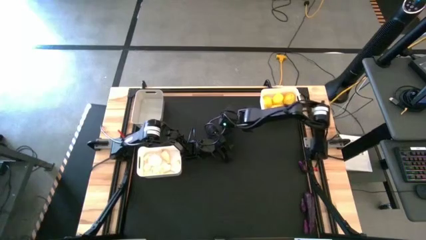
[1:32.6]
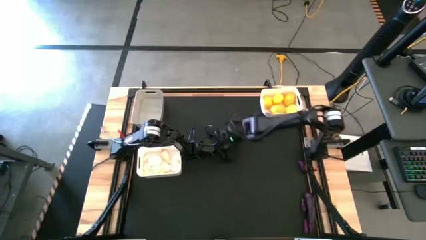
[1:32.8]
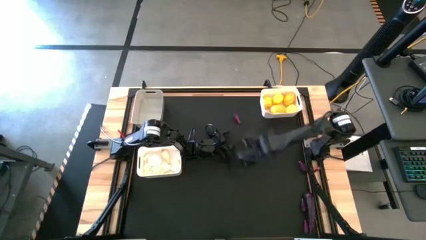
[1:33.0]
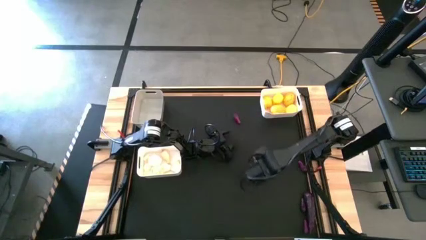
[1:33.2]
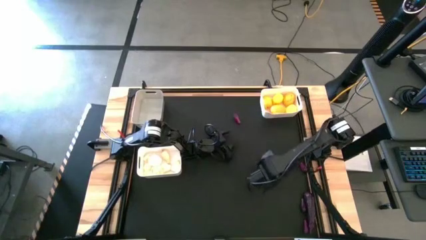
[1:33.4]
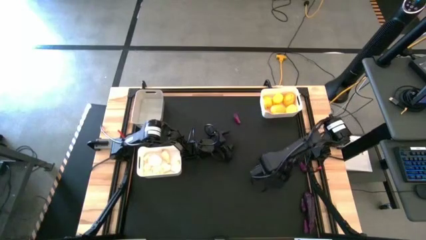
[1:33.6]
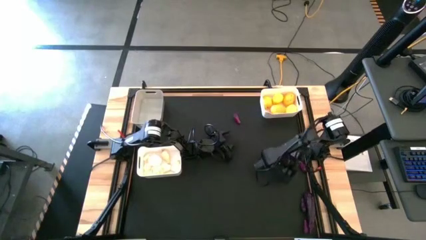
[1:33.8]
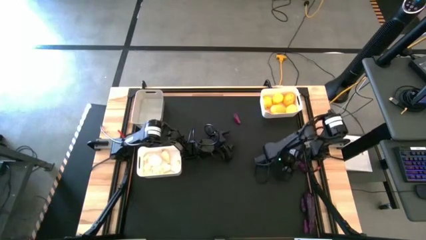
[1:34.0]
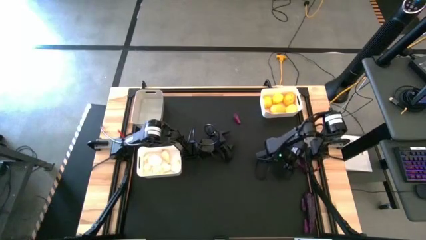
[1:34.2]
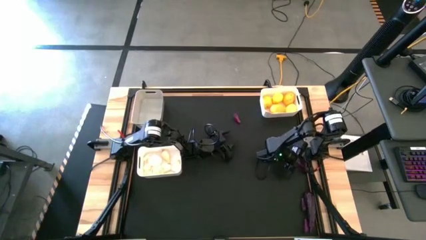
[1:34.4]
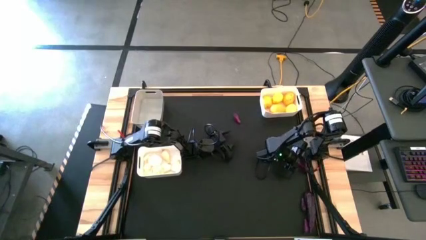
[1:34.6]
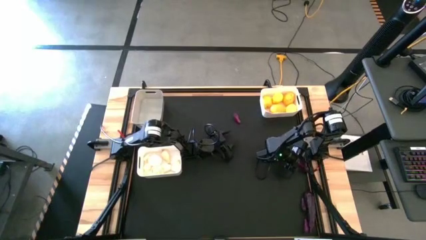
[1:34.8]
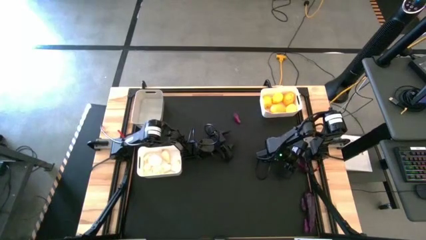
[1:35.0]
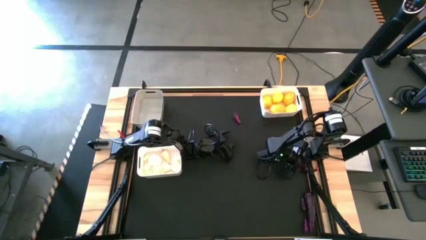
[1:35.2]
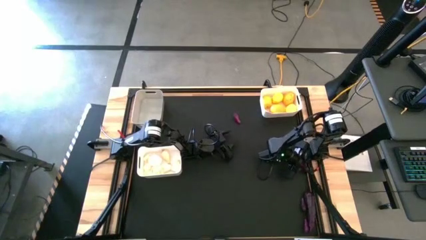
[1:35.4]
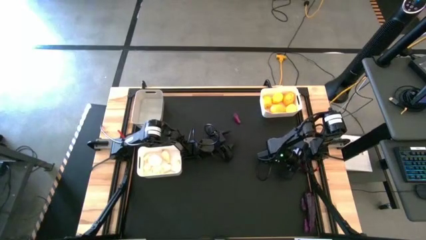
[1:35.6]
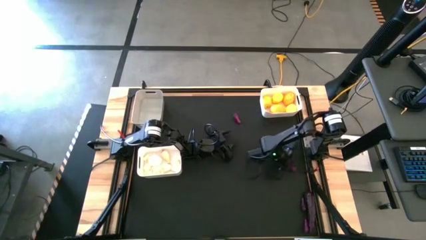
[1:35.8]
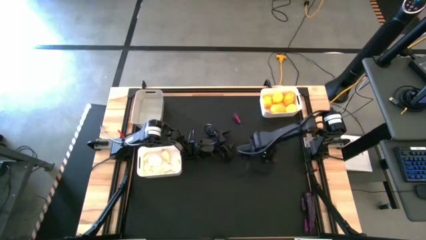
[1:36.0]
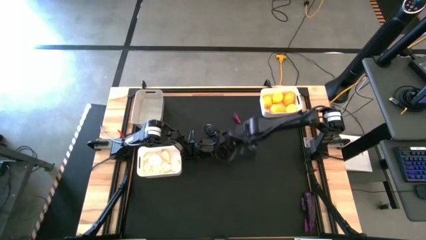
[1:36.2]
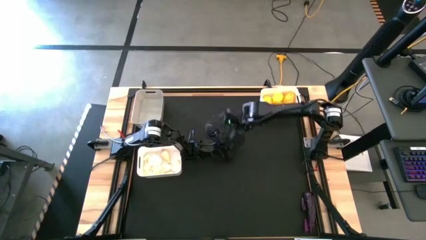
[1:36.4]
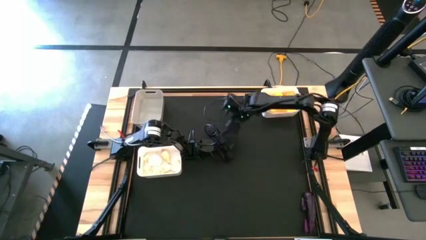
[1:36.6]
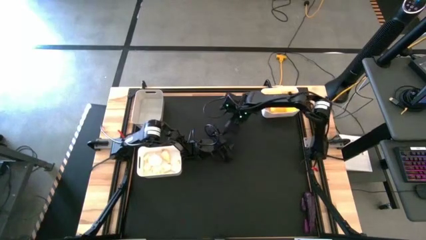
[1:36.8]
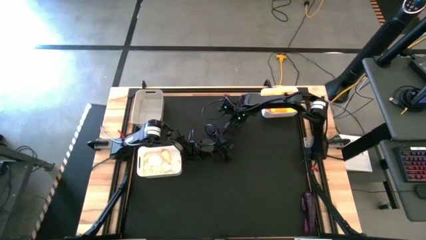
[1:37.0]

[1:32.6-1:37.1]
Task: Sort produce into baskets
Move the violet eggplant to the top center of the table

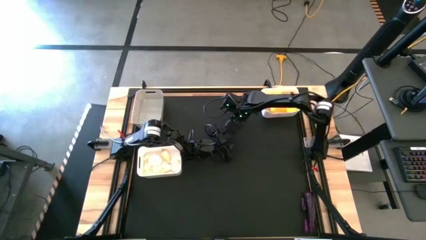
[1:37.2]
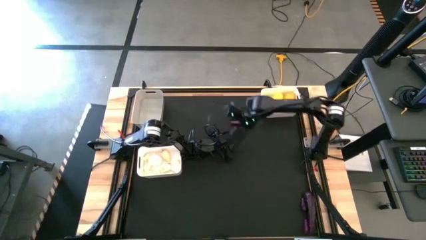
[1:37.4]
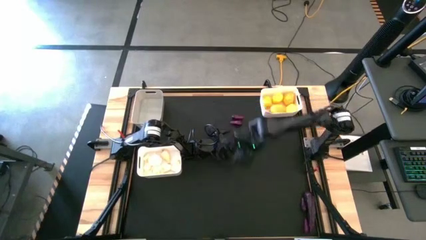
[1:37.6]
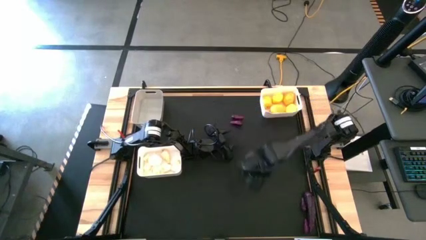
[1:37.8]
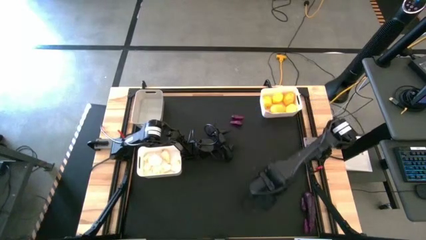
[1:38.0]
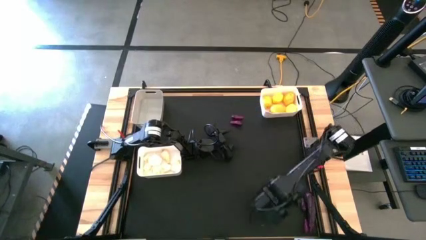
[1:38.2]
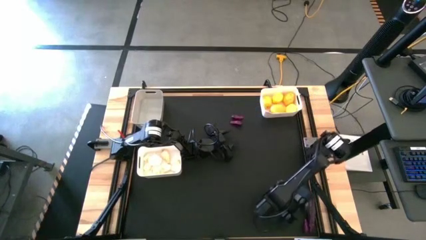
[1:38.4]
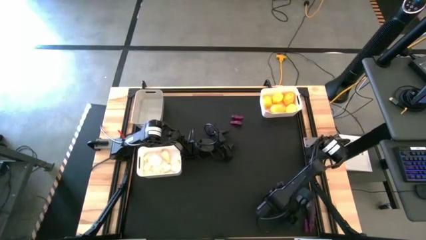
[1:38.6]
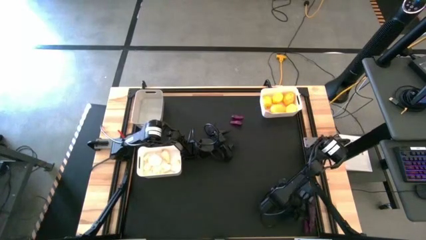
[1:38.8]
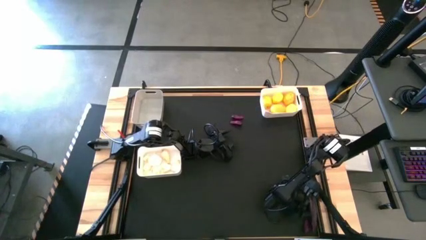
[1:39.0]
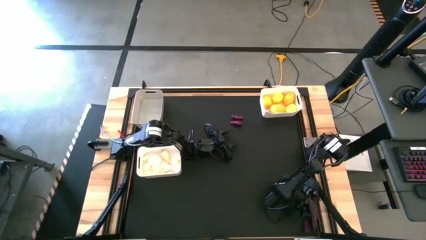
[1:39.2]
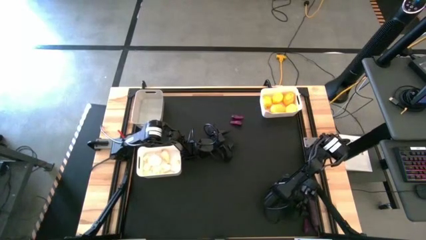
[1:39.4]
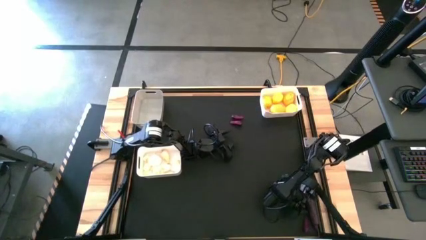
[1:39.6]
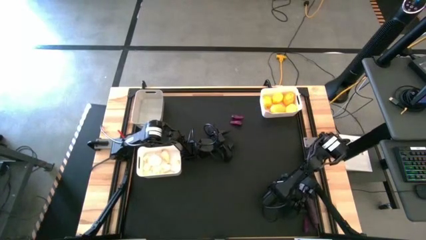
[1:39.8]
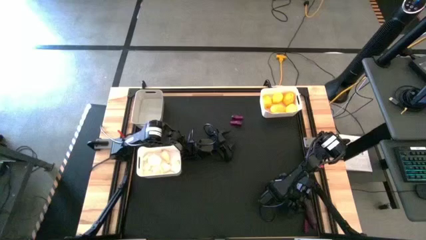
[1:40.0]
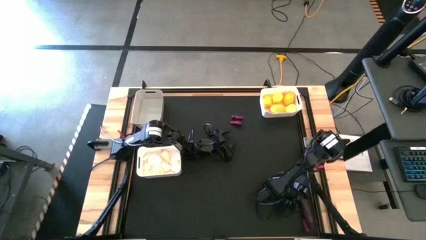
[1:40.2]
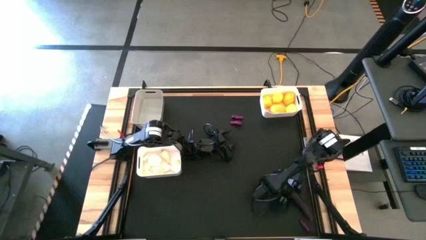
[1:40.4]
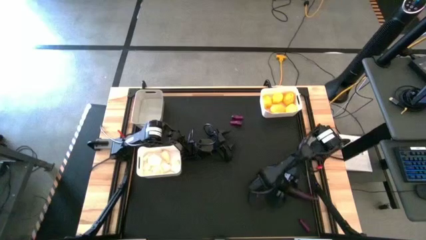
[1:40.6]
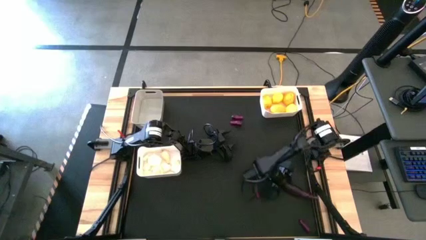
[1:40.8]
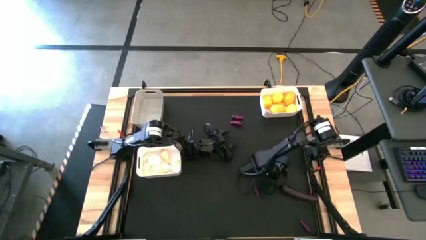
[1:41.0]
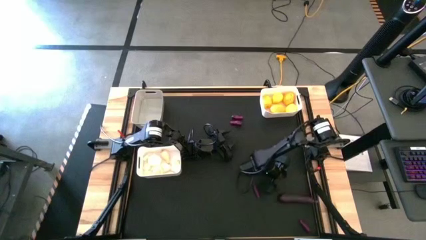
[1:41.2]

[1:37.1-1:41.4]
Move the violet eggplant to the top center of the table

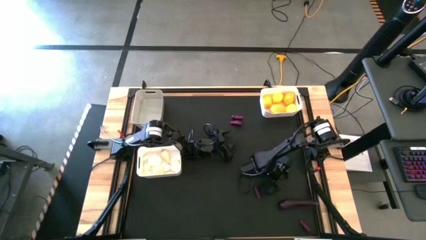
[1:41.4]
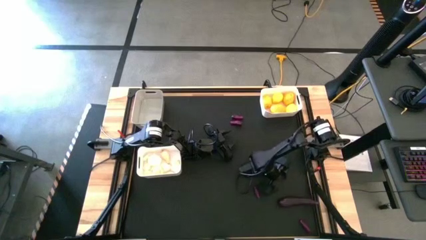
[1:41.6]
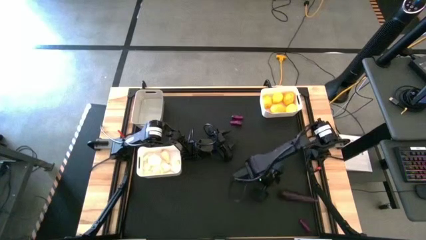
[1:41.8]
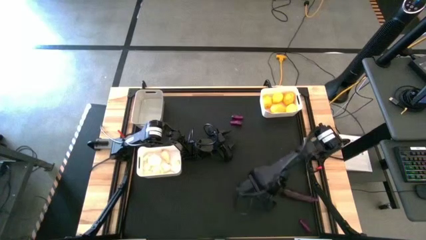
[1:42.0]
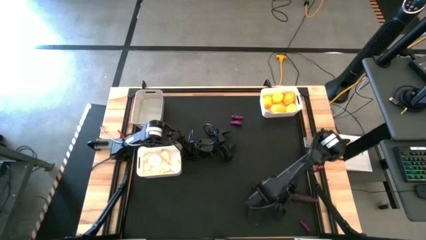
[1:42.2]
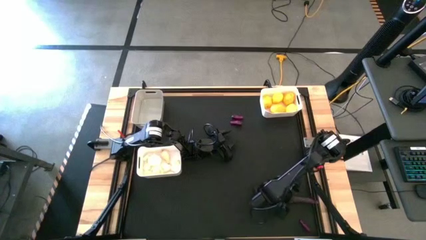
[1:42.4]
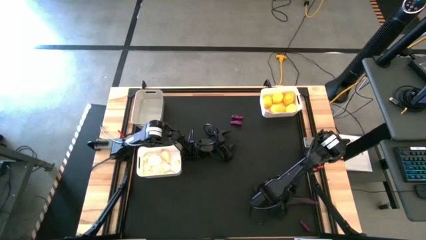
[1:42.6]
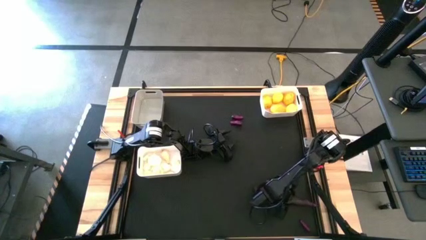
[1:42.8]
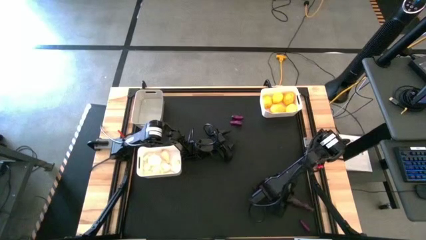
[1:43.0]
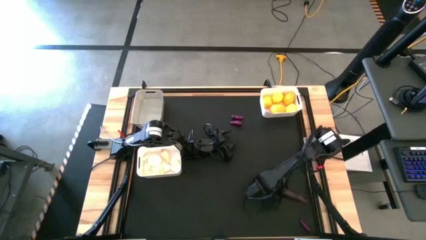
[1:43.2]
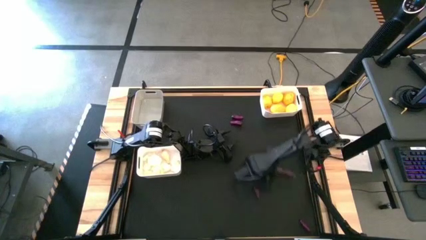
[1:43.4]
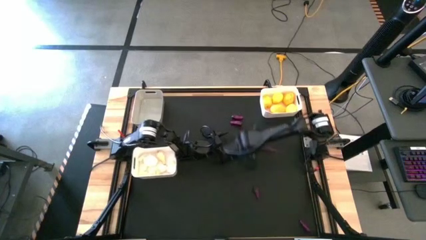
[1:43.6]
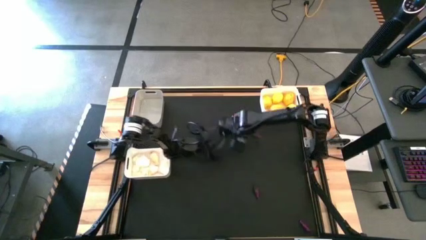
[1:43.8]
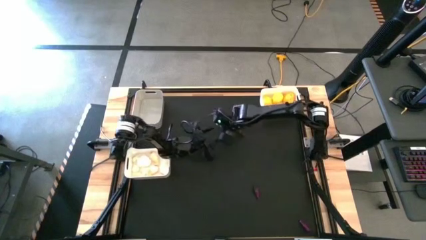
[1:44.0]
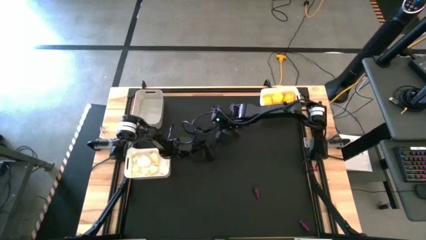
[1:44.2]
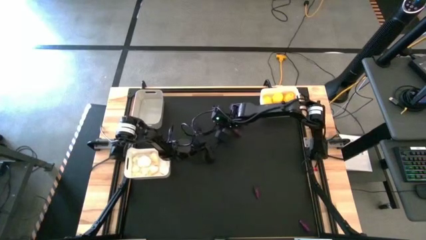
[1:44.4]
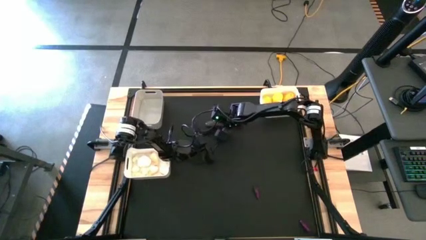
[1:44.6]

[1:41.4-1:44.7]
Move the violet eggplant to the top center of the table

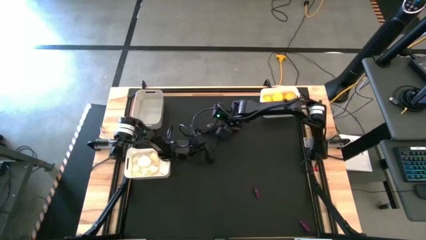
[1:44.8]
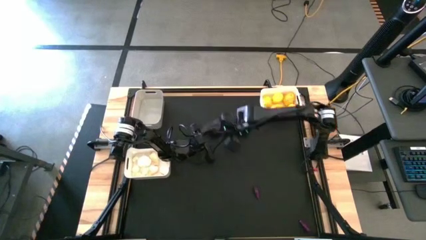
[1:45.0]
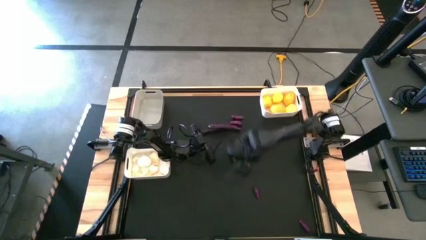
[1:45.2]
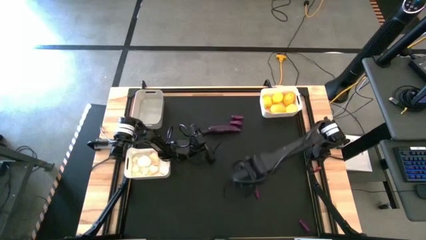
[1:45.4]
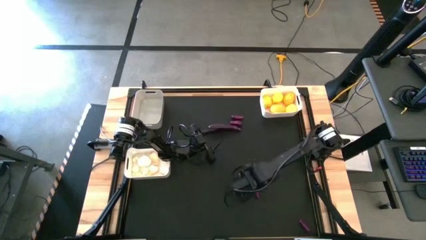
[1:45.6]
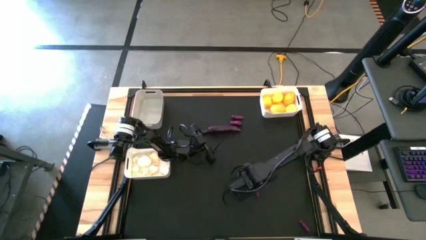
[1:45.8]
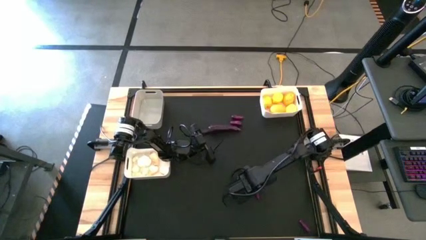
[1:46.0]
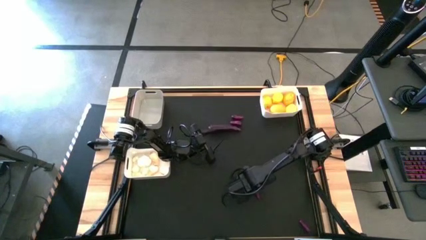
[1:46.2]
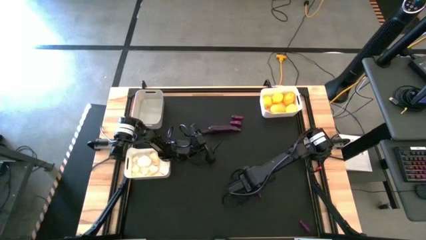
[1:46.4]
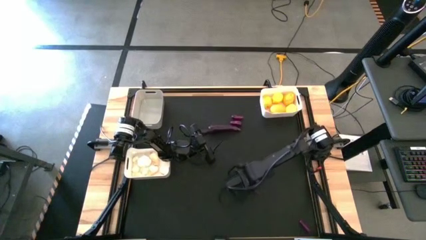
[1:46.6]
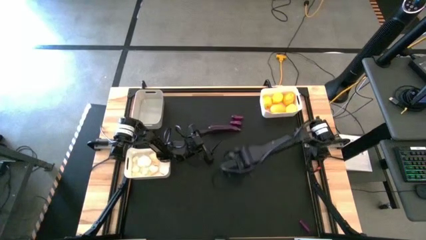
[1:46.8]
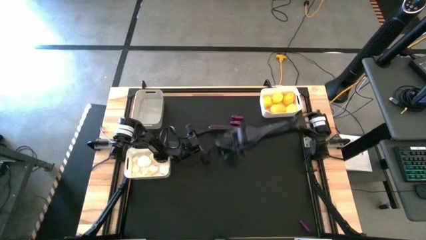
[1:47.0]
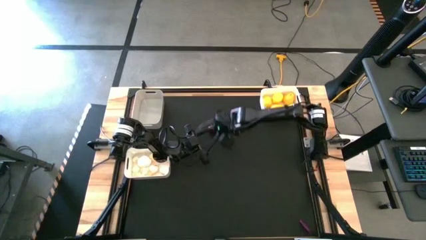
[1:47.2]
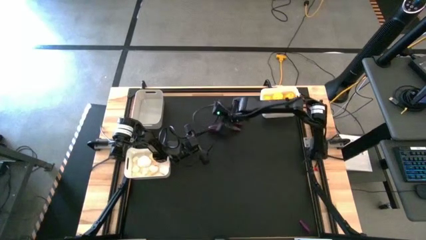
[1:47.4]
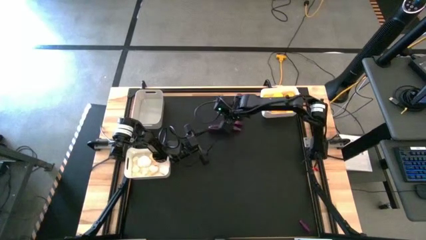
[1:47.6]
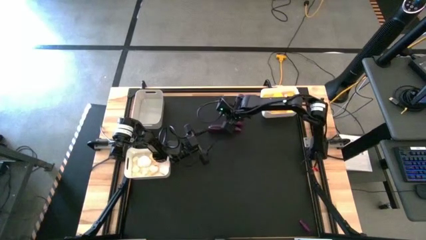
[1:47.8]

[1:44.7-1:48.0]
Move the violet eggplant to the top center of the table

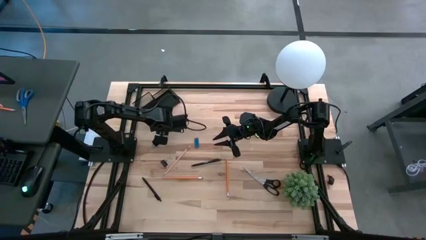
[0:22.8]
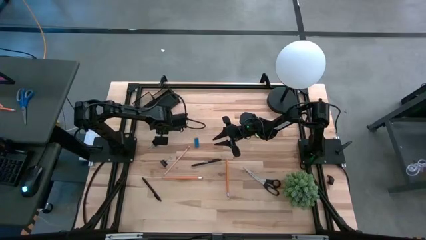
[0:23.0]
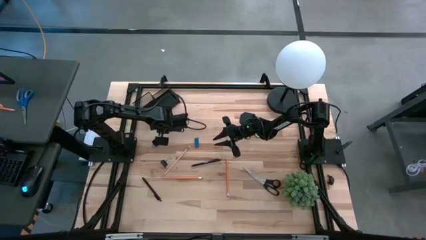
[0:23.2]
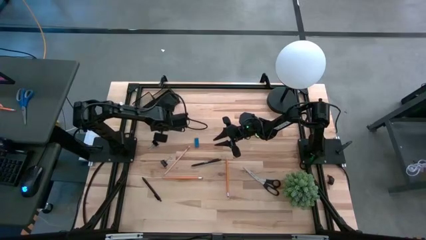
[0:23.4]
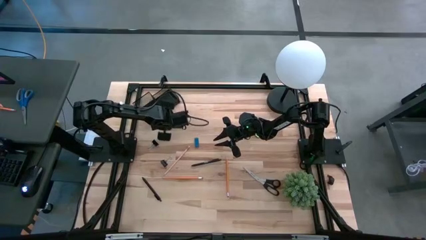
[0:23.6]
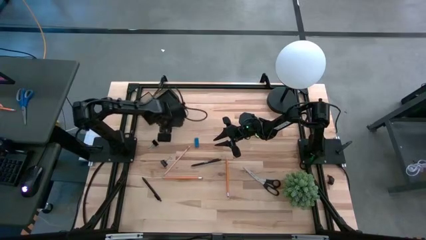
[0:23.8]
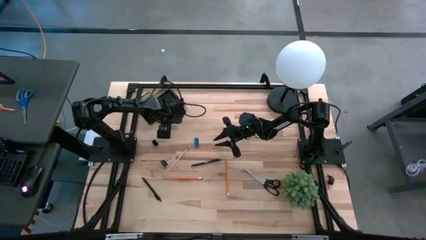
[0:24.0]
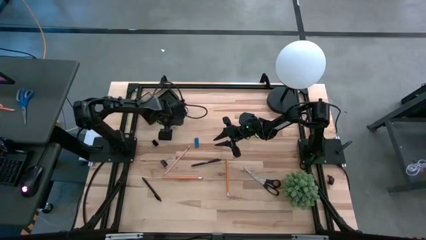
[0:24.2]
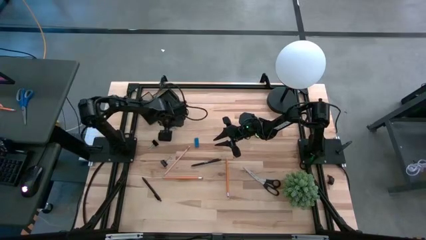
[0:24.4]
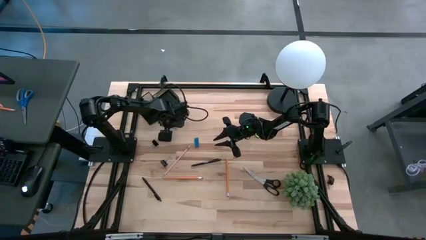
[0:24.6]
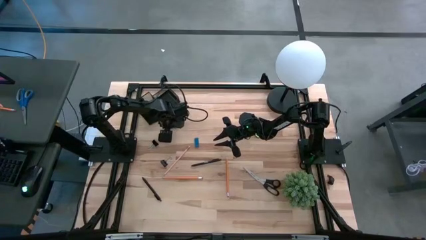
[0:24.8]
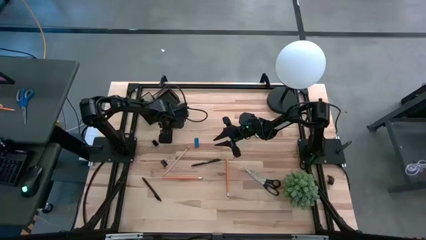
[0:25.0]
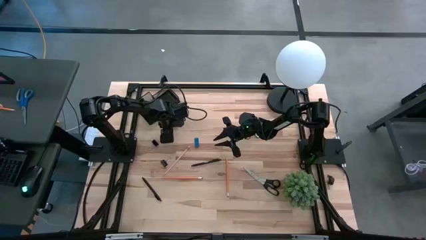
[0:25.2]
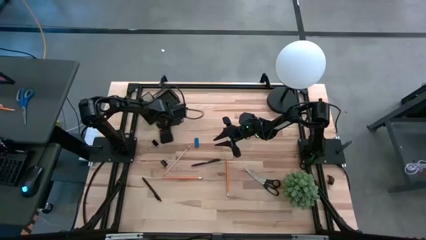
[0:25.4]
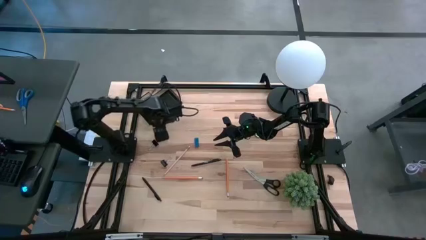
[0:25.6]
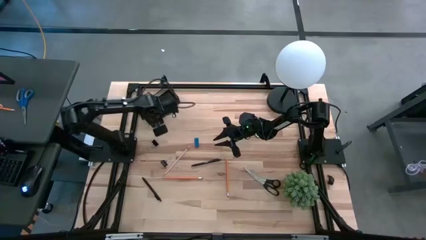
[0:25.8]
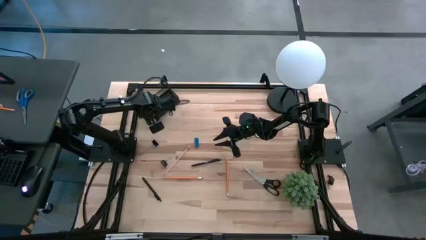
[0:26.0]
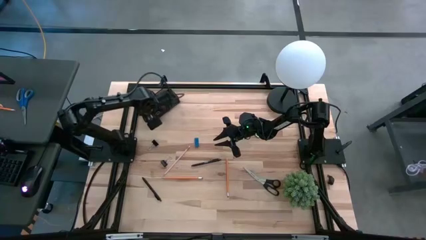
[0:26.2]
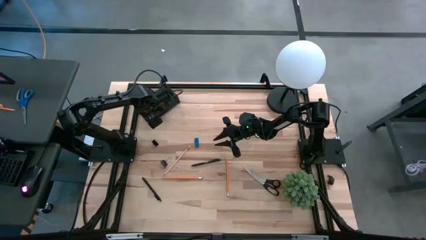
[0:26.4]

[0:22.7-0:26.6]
Task: Pick and place office supplies into organizer
Put the black binder clip into the bottom left section of the desk organizer
